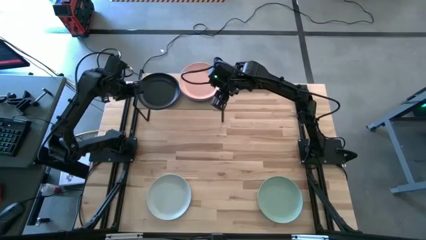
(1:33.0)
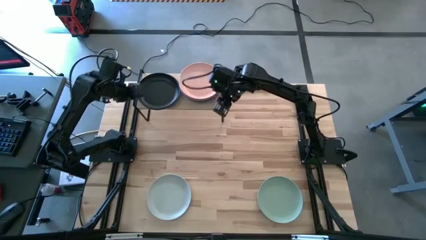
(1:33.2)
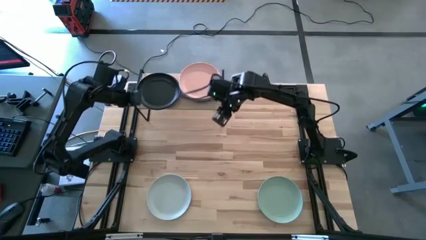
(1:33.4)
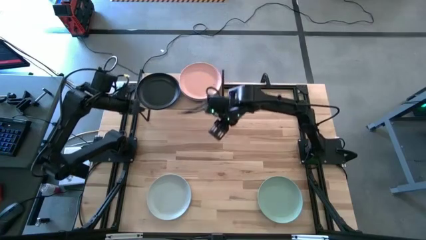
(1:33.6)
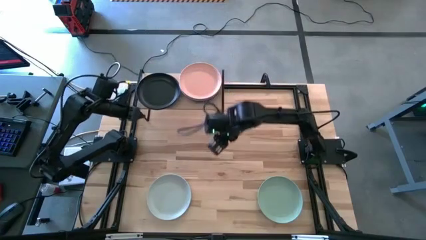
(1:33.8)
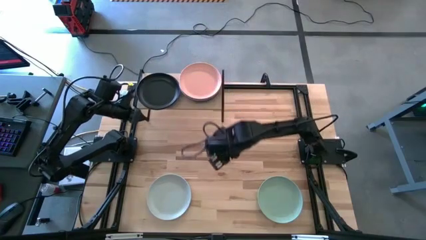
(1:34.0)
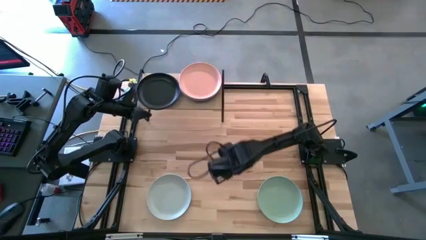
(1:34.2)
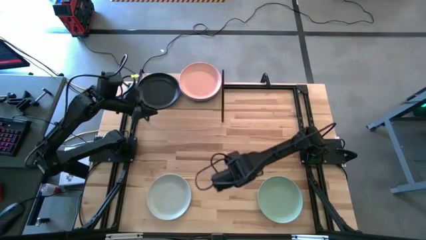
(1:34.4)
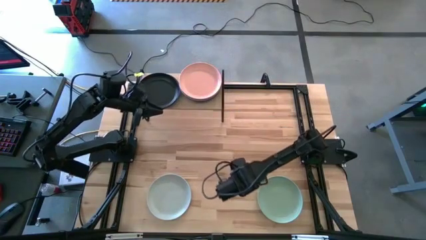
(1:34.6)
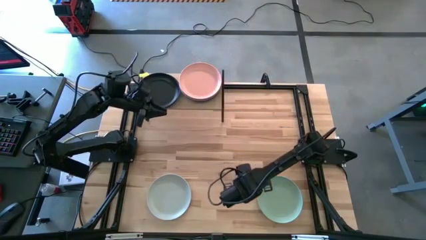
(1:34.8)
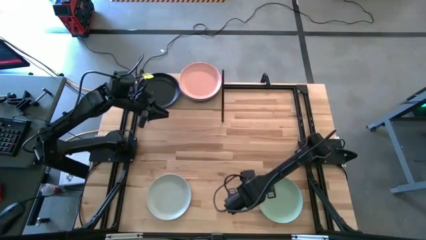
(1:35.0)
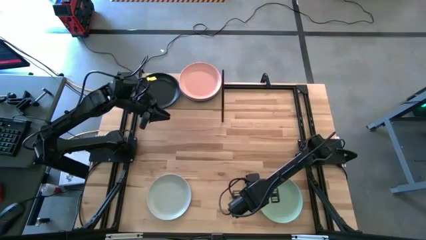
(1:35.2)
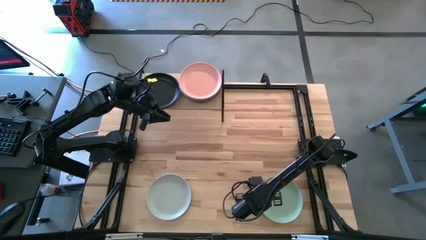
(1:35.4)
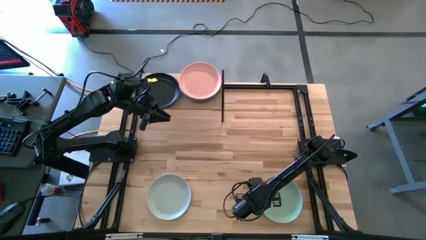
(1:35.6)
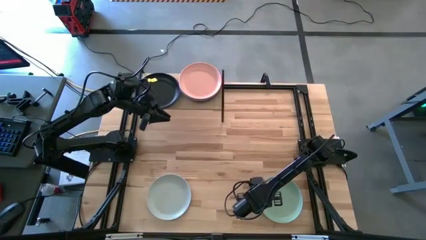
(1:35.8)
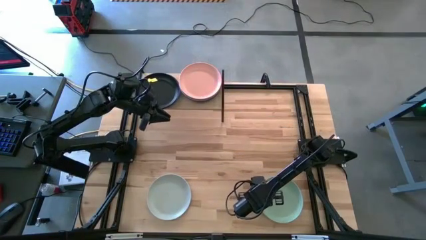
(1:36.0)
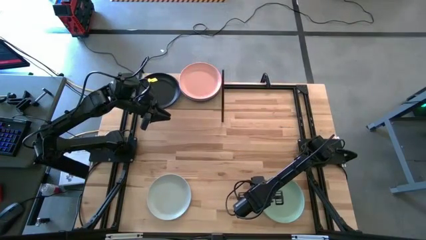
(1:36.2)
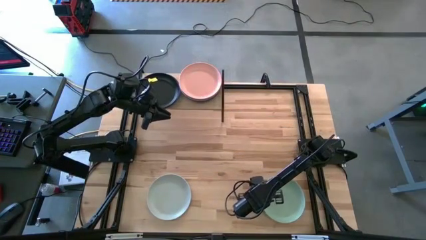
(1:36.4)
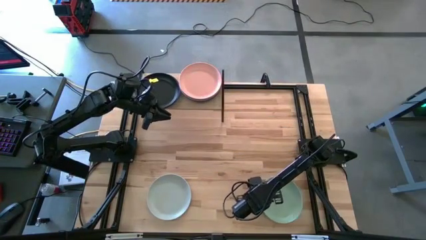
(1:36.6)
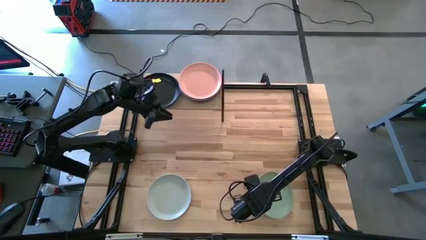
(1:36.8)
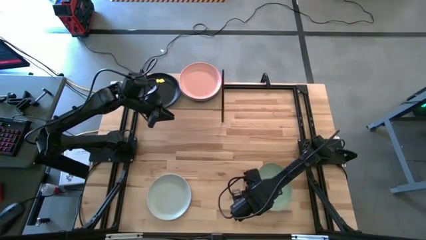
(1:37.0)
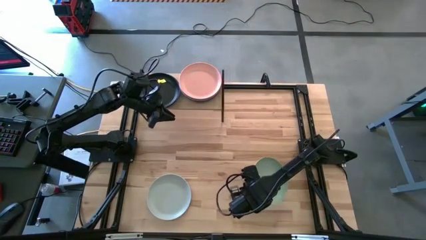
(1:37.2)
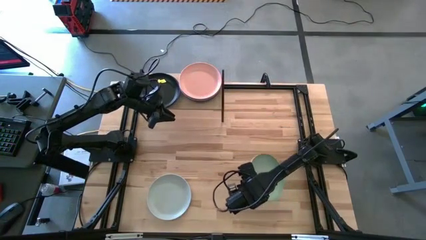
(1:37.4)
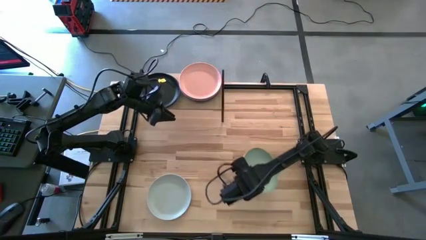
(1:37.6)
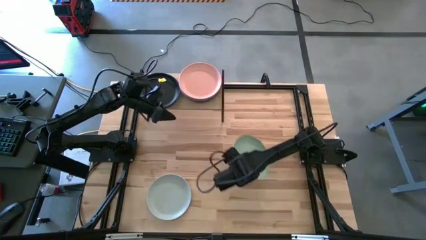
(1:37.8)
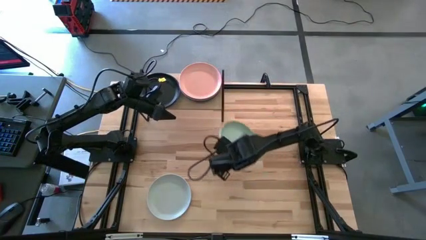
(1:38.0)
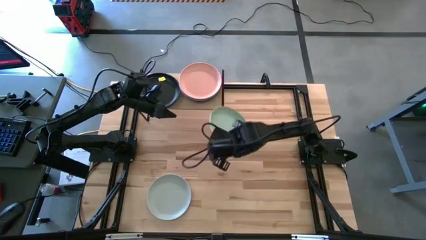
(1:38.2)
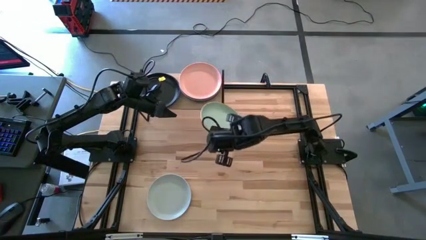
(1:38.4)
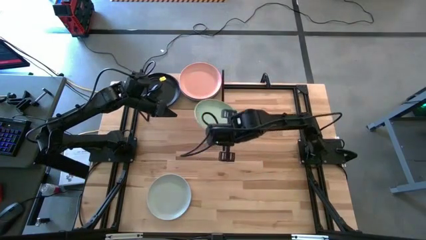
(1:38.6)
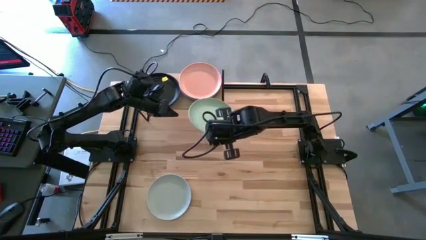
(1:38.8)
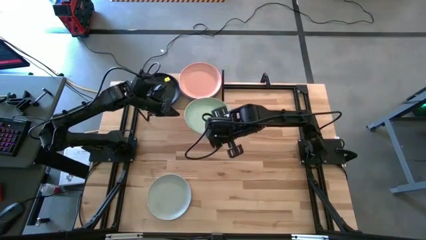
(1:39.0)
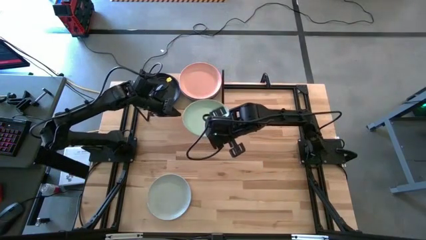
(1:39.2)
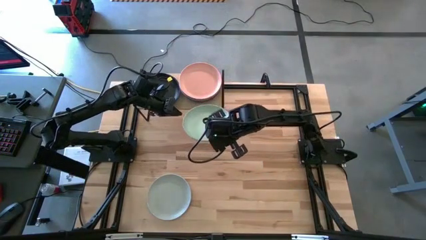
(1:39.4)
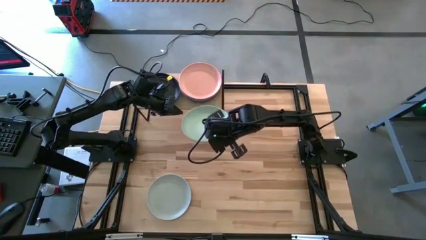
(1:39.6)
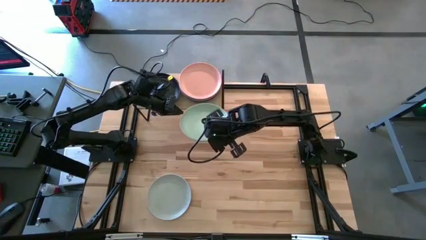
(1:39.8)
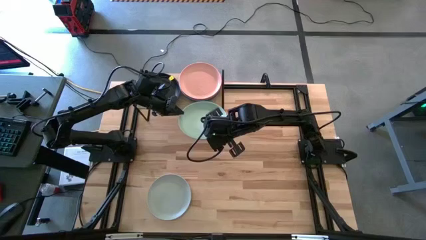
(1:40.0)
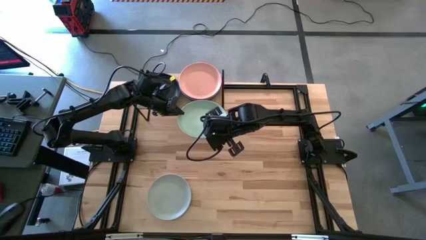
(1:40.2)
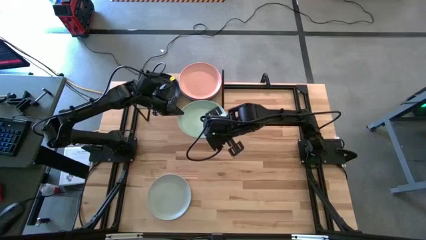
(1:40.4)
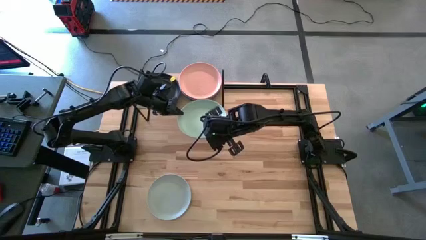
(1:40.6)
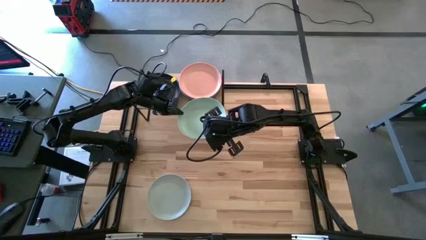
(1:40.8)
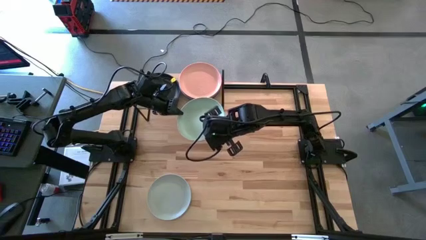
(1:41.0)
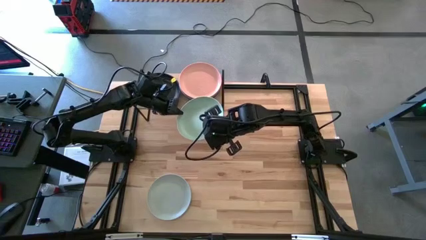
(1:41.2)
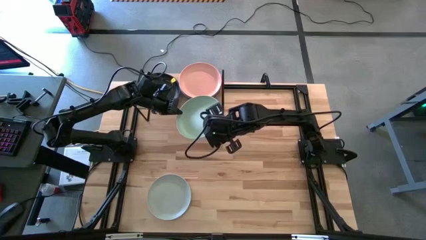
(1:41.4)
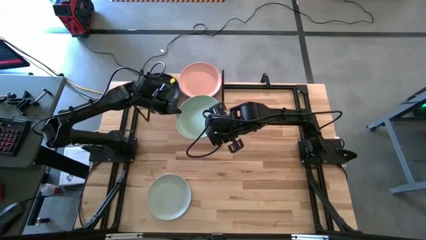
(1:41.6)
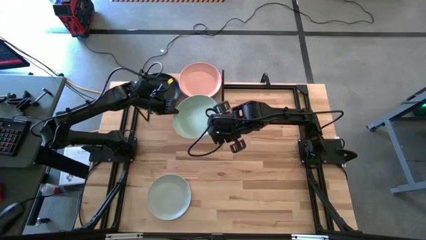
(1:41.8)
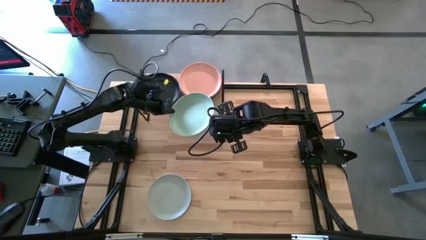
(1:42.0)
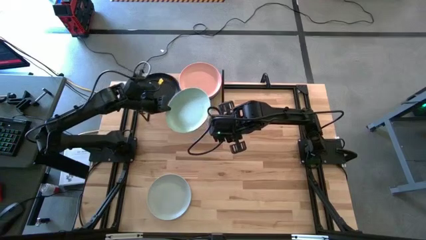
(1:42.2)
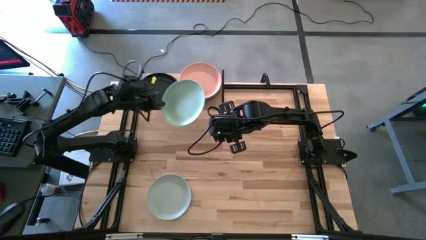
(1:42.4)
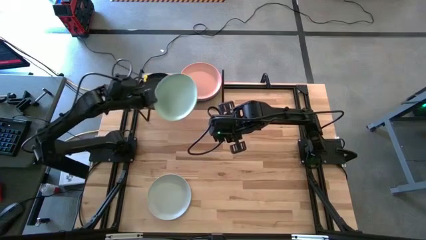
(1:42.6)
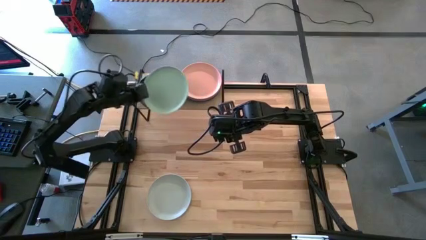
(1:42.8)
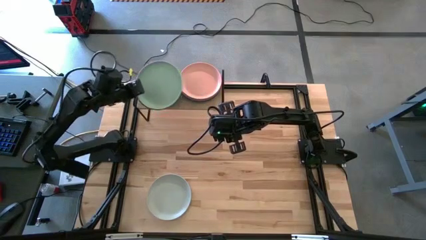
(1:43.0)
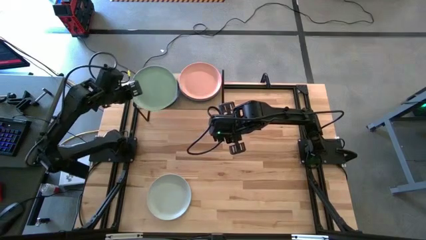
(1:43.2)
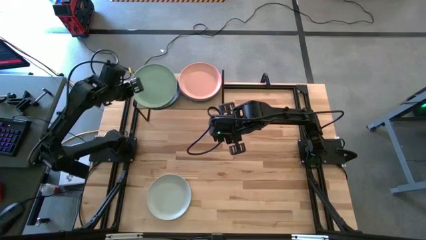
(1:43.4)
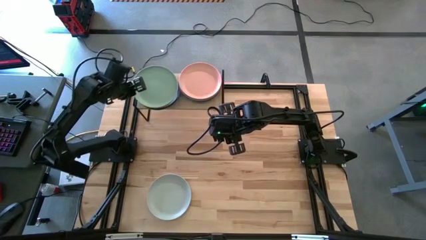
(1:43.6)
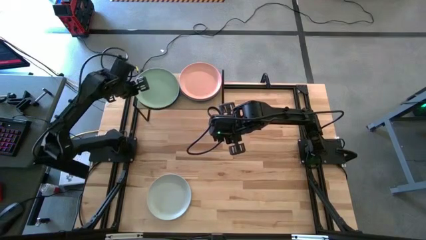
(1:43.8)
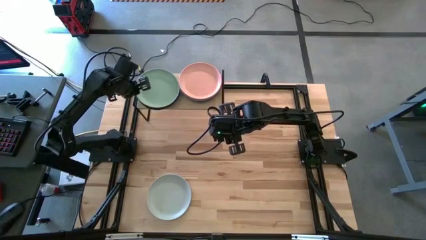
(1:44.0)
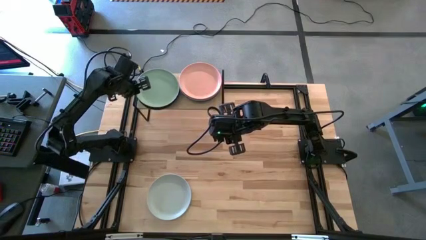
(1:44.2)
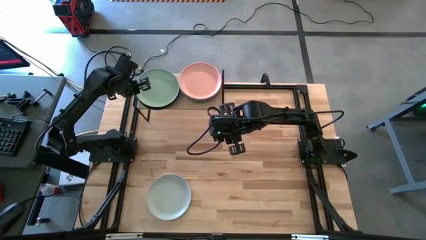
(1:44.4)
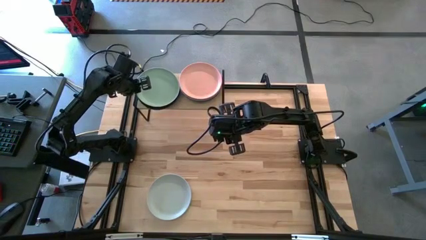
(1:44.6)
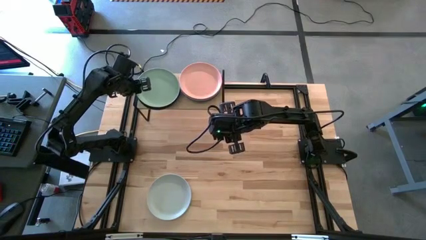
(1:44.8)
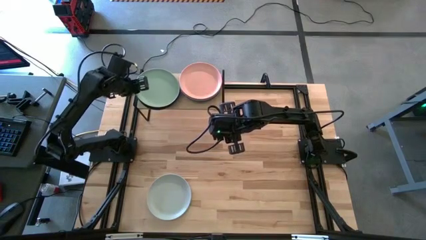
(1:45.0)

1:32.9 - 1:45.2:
Task: Place and stack plates onto a shelf
Stack the light green plate on top of the black plate on the shelf

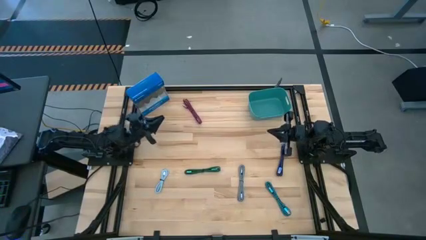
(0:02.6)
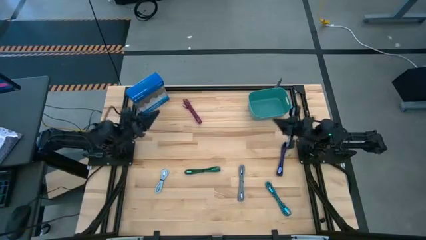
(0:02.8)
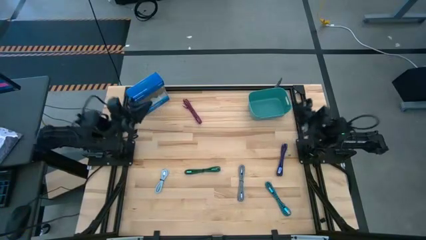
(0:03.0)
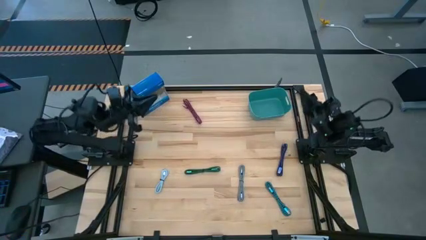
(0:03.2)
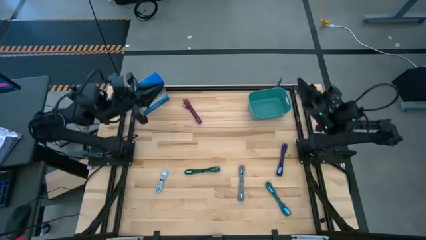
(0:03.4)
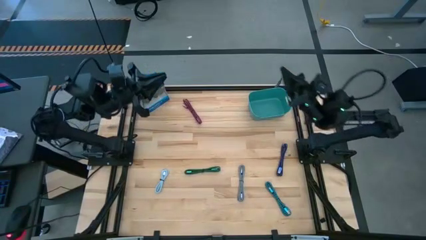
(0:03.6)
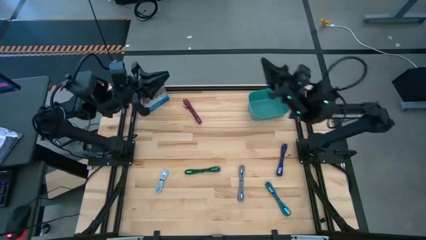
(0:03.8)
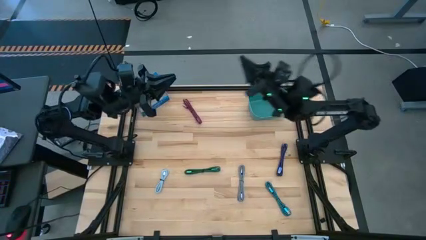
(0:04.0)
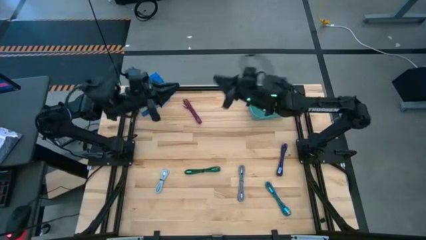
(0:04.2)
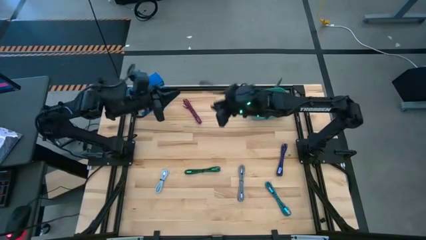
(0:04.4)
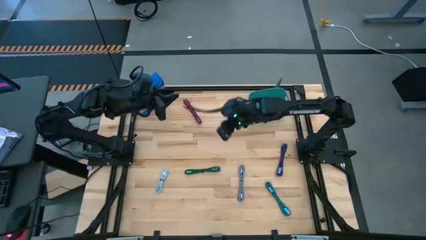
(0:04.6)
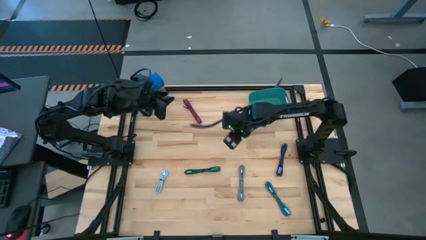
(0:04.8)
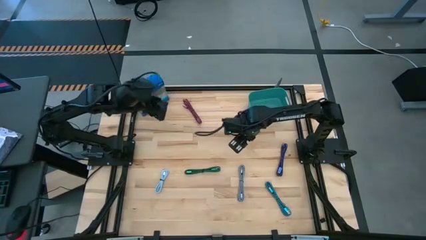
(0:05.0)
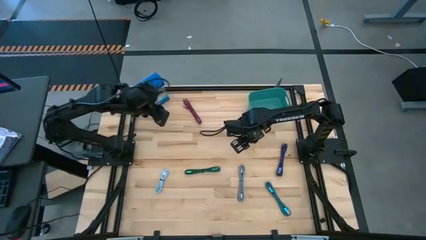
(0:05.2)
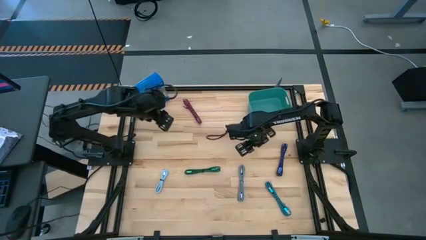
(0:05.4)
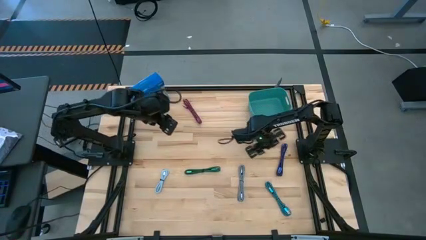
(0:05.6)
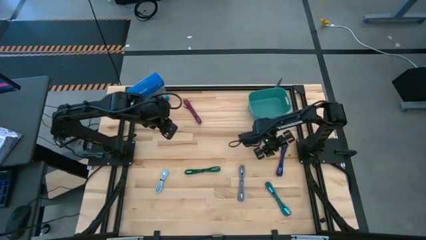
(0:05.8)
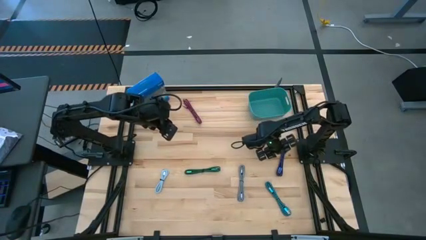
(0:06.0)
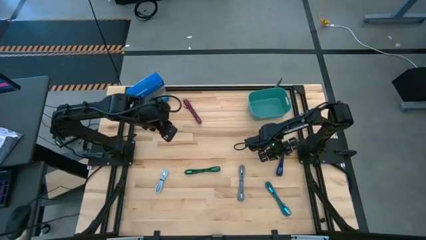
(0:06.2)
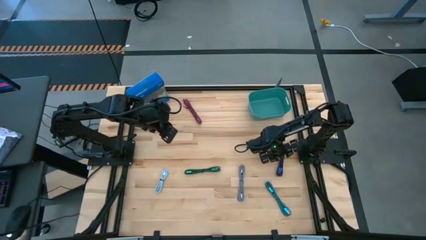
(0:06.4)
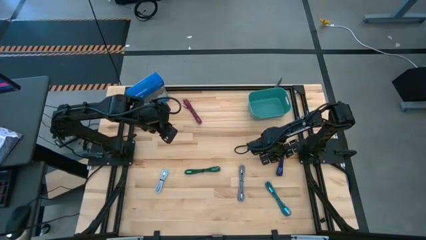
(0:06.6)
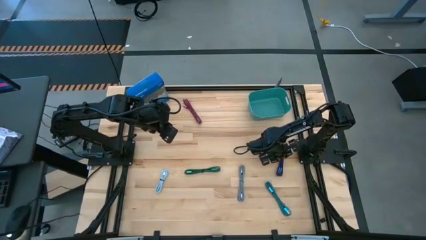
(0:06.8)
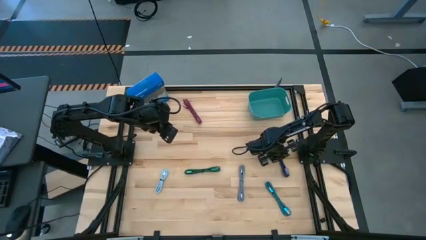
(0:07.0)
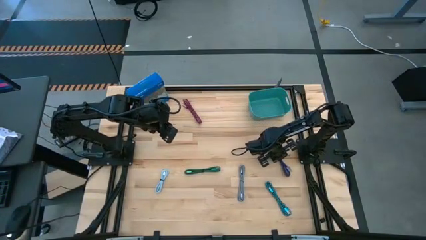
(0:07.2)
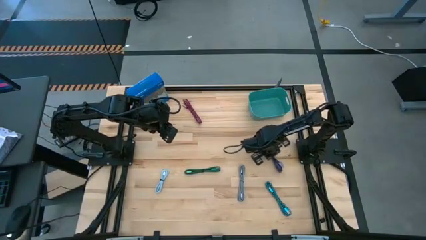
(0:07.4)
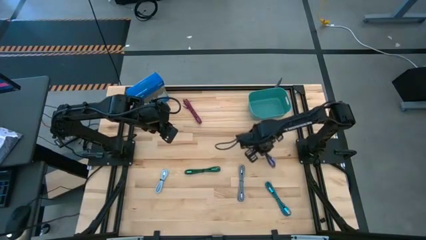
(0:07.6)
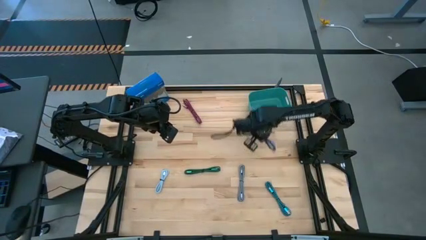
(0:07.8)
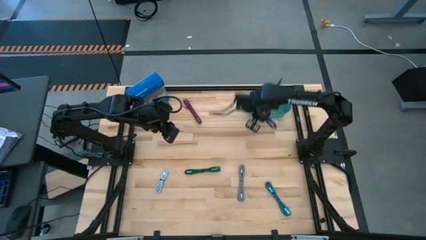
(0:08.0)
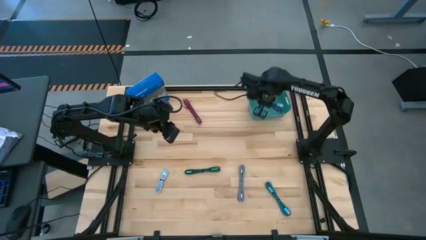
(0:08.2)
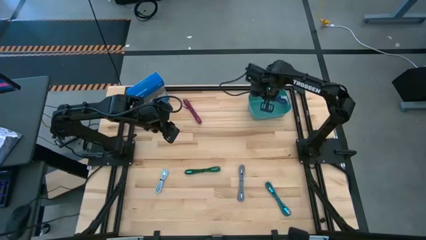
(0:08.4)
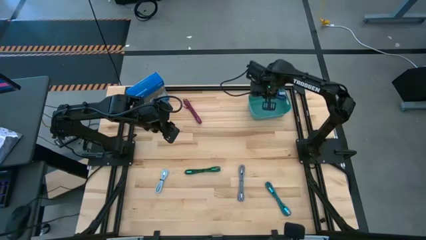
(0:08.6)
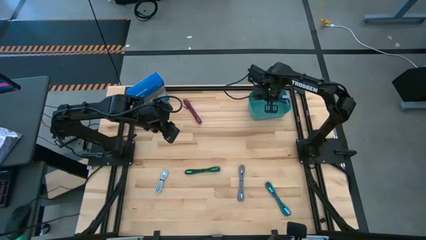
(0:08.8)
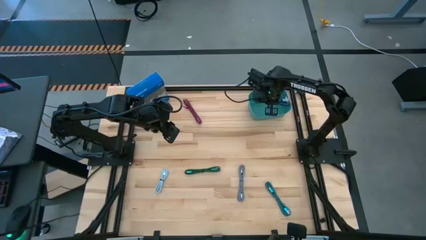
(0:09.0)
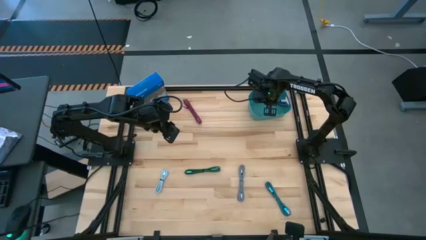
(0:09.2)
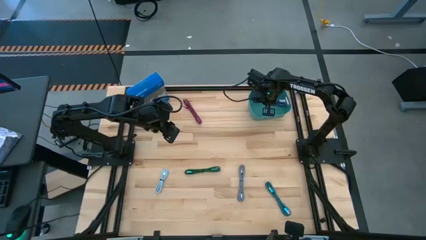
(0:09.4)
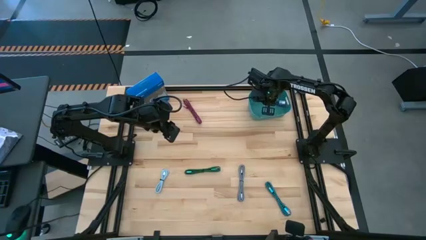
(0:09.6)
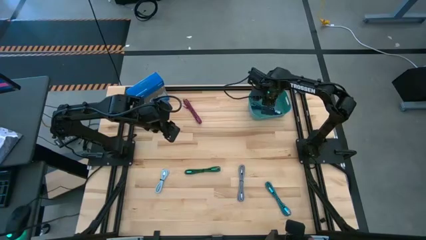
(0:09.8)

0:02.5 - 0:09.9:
Task: Pick and place USB-C Cables
Put the purple charger cable into the green bin
